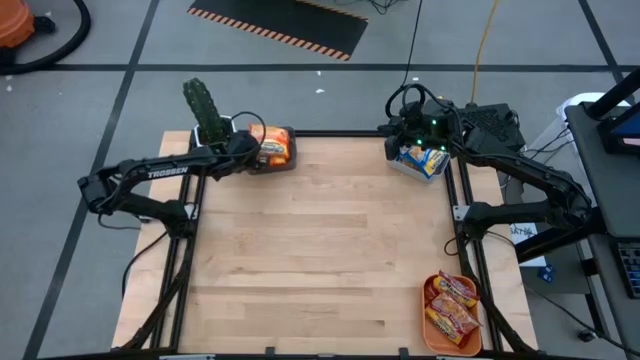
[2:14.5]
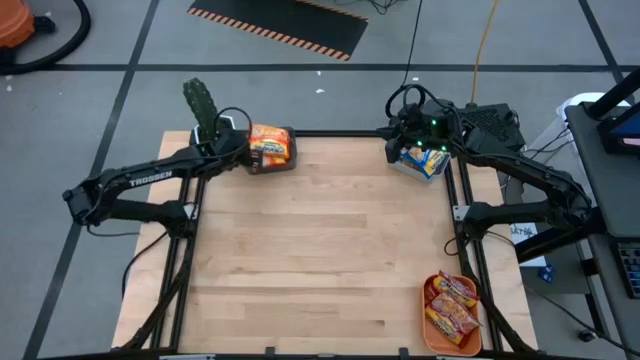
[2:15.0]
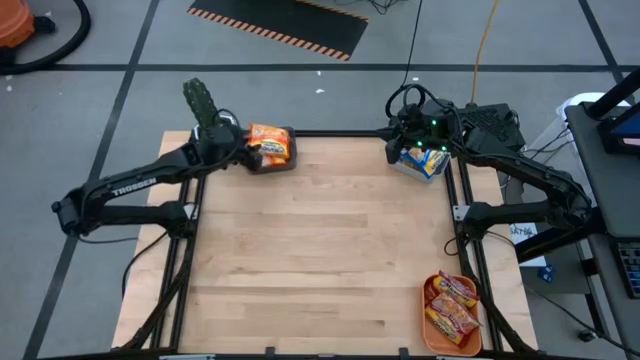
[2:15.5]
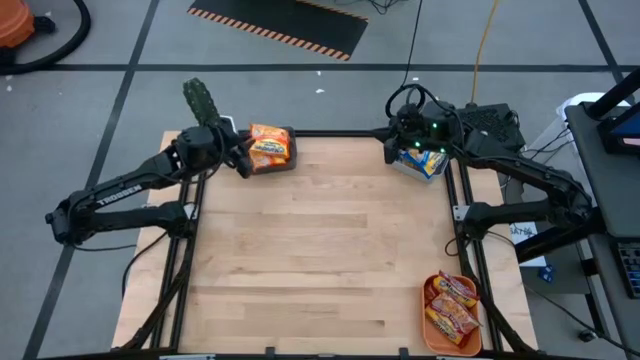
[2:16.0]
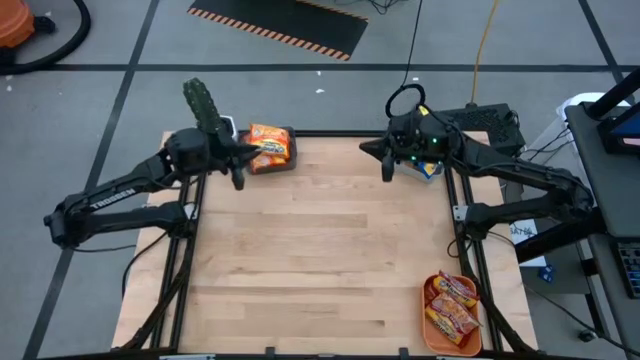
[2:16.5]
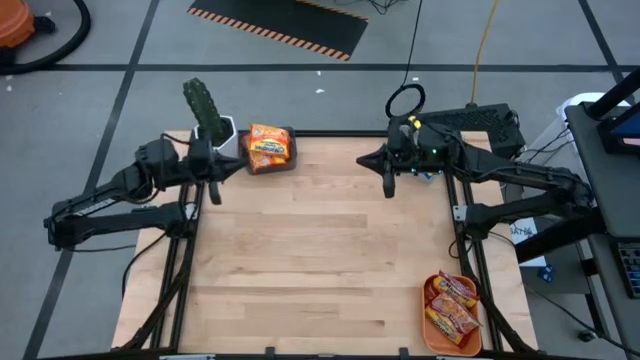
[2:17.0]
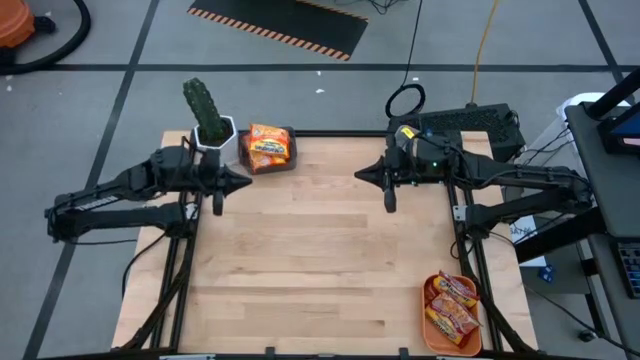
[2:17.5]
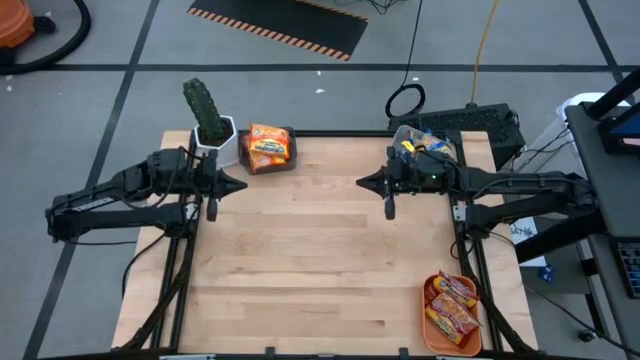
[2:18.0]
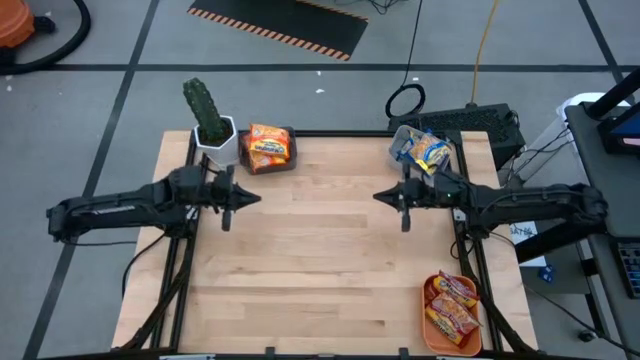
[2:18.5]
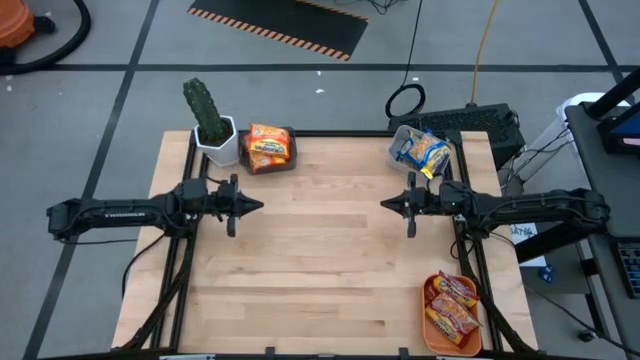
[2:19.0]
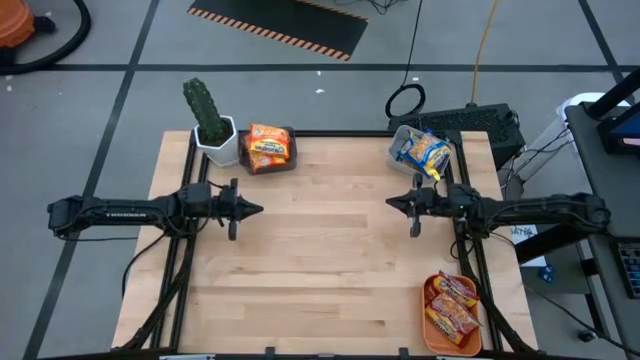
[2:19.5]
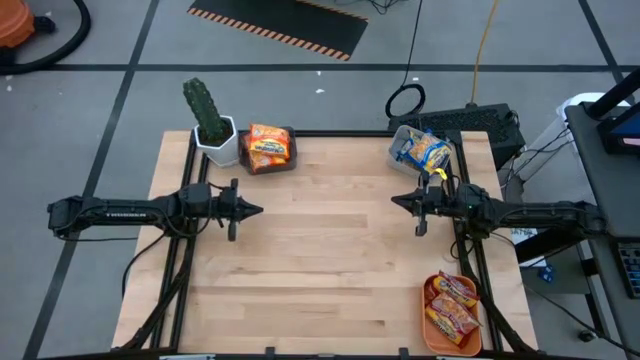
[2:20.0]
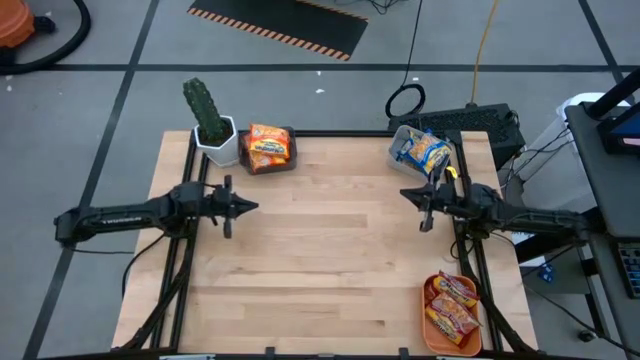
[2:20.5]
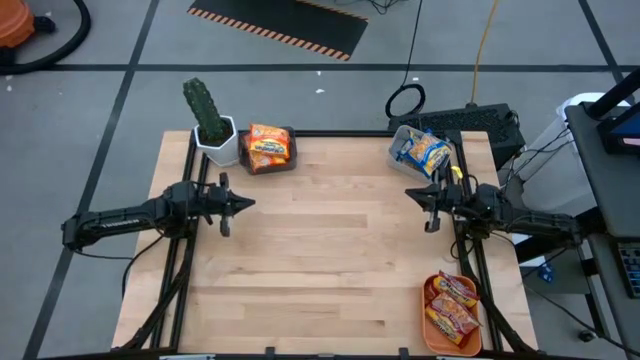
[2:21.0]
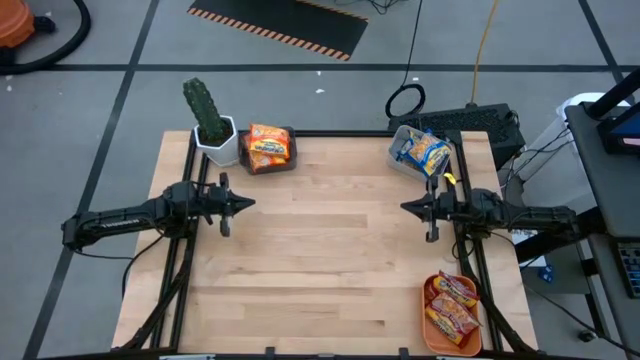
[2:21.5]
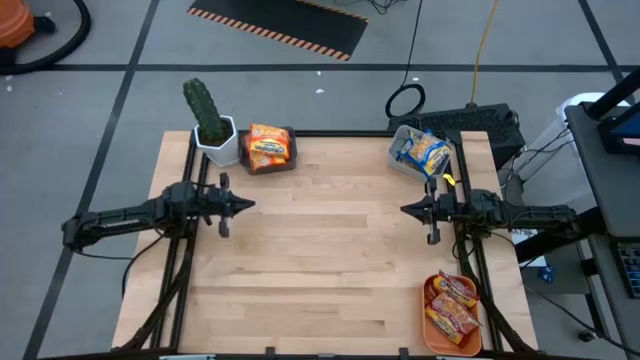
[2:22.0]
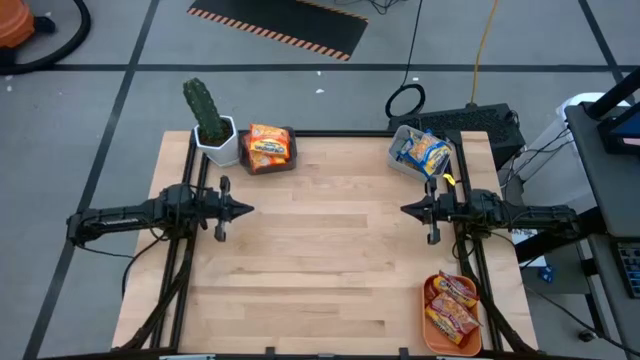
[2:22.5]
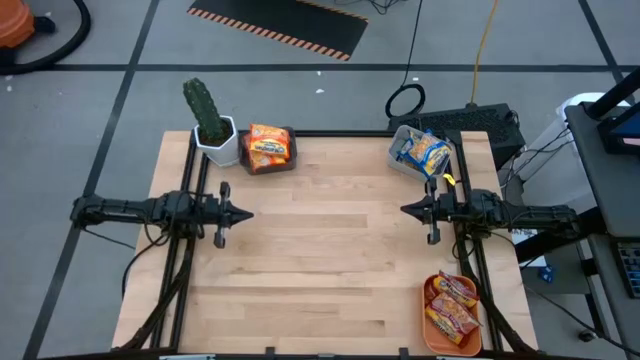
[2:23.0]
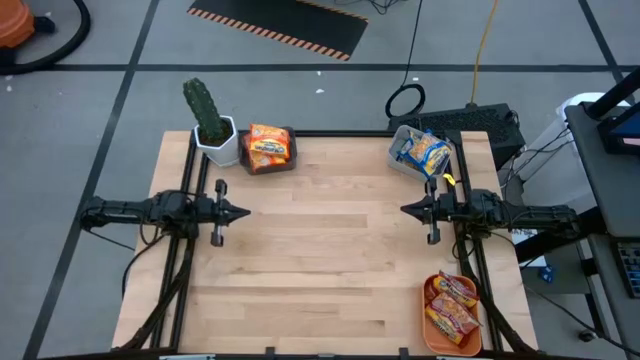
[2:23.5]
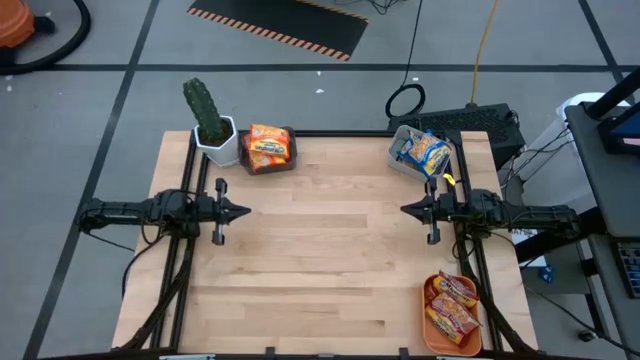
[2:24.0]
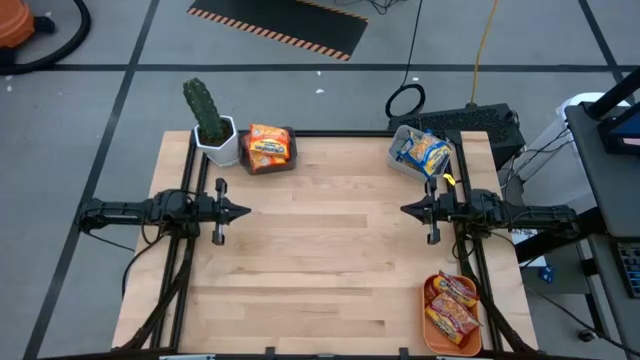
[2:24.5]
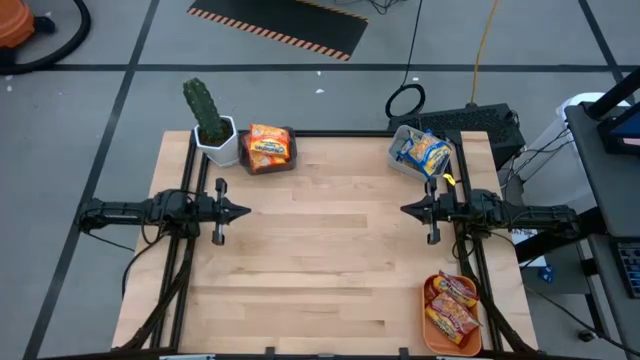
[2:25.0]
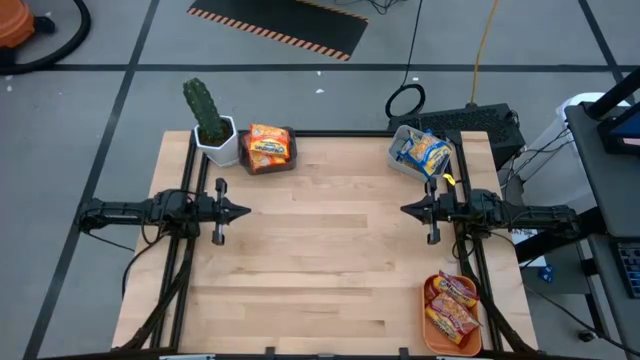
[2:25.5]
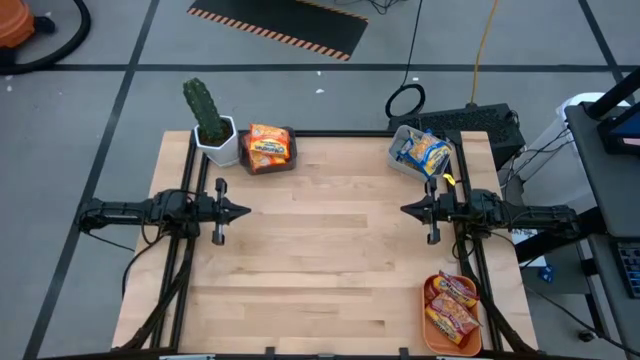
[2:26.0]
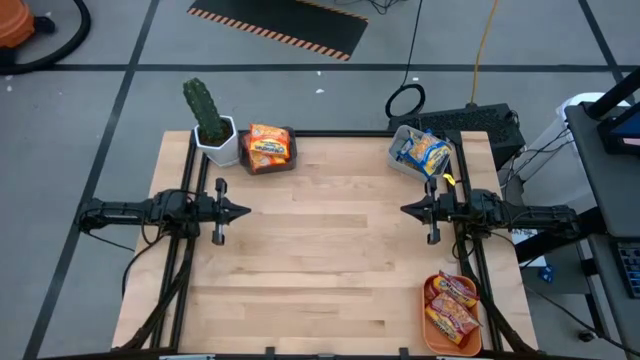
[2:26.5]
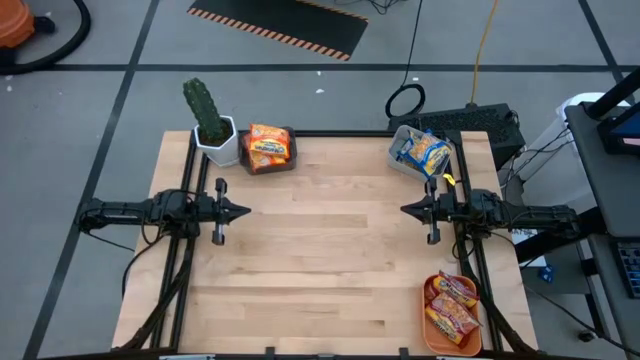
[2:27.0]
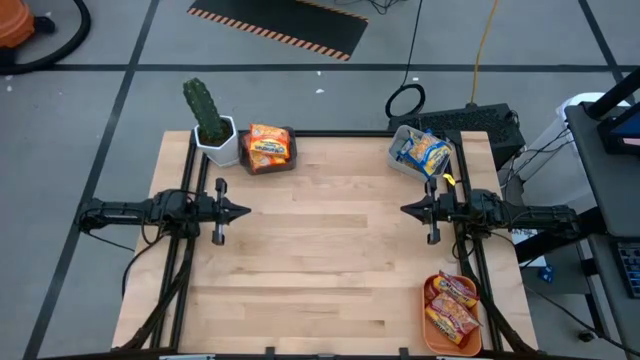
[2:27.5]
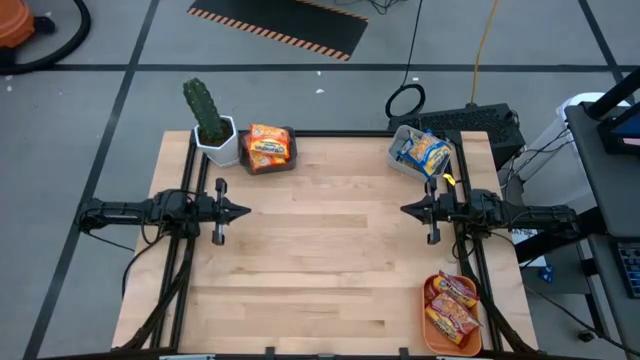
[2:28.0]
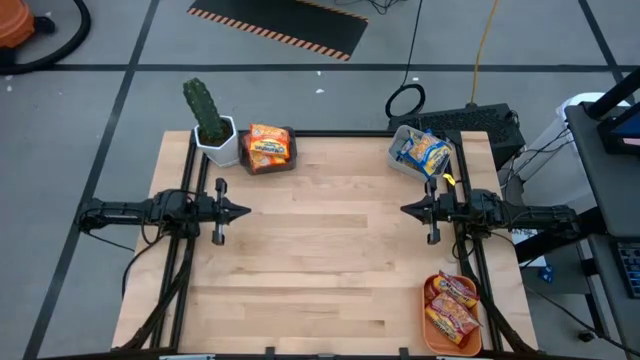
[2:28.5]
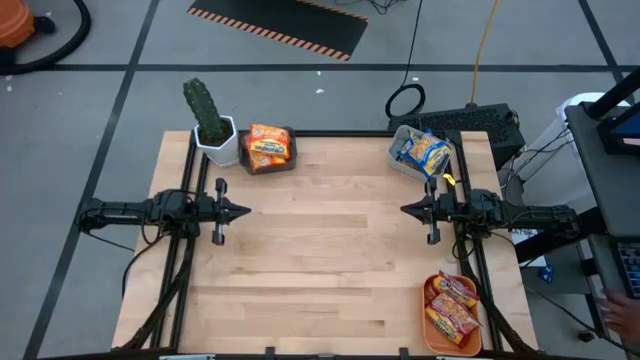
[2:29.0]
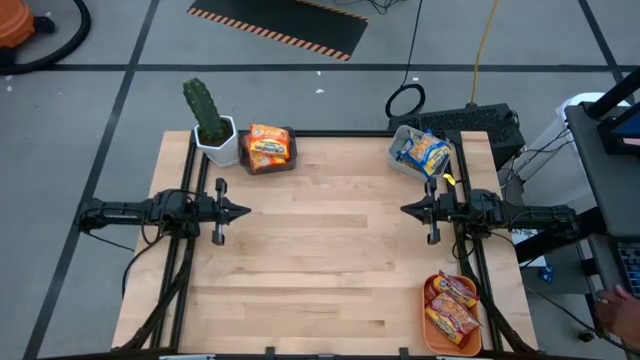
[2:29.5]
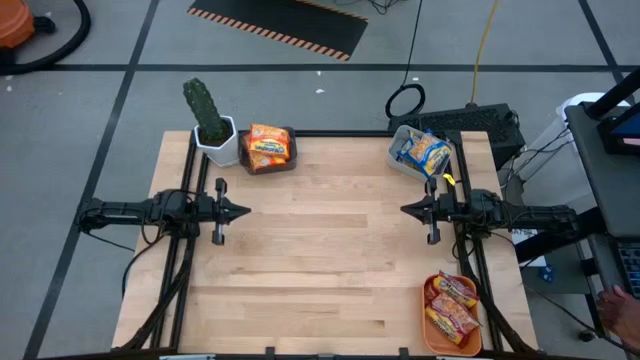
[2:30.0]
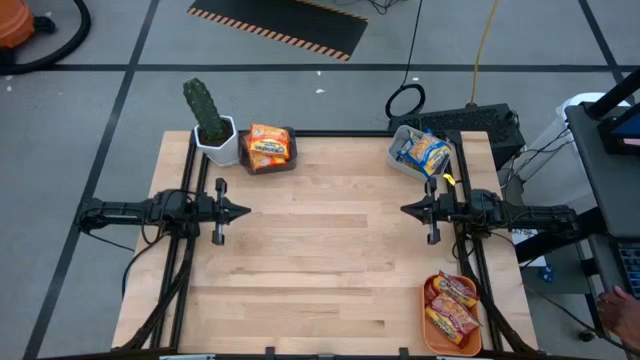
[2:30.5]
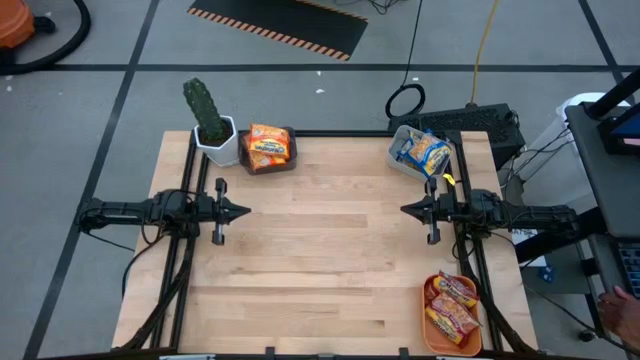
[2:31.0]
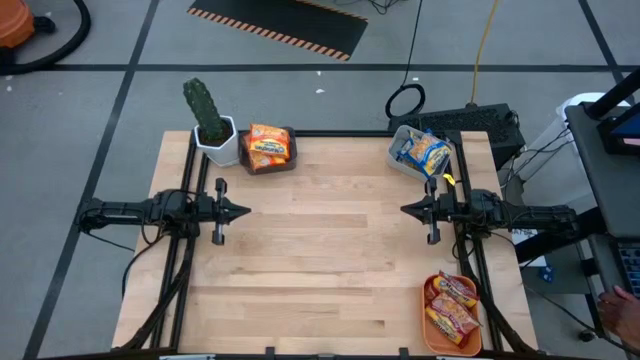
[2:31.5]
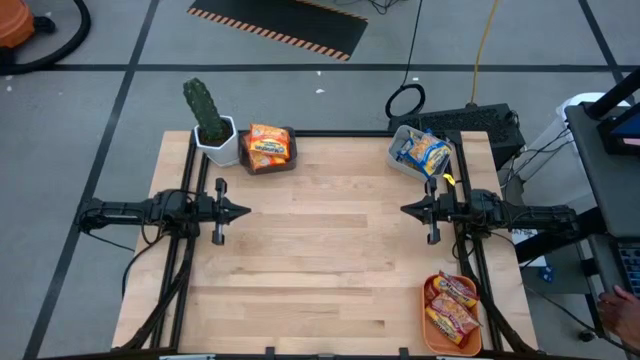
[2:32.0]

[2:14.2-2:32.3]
Task: Sort Maruchan noodles
Return to Home Position

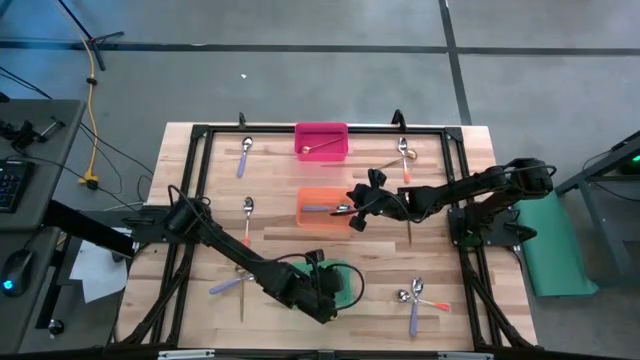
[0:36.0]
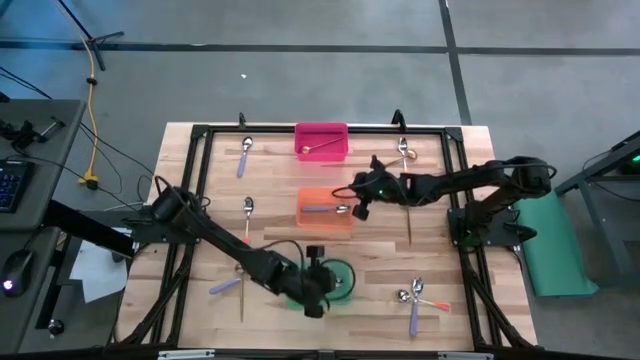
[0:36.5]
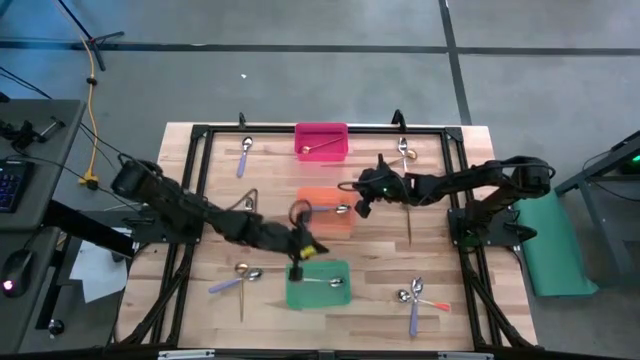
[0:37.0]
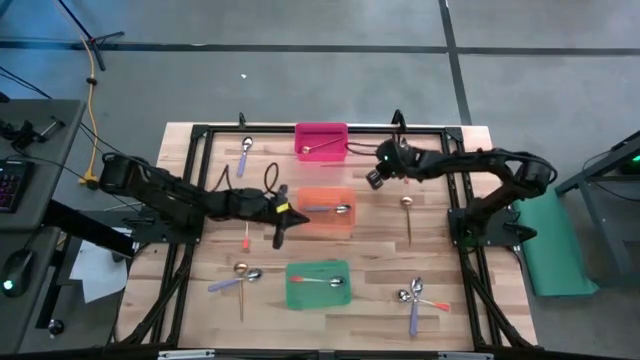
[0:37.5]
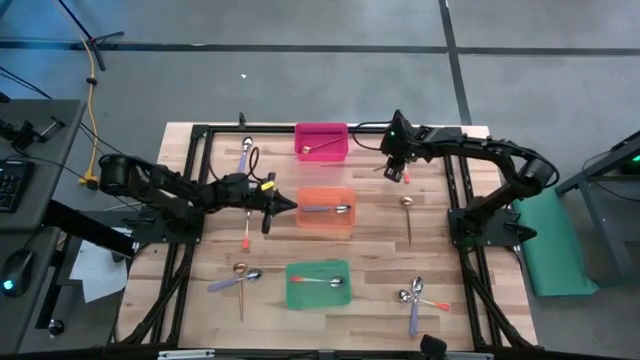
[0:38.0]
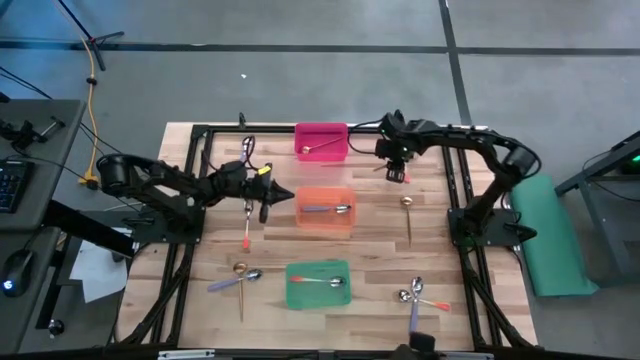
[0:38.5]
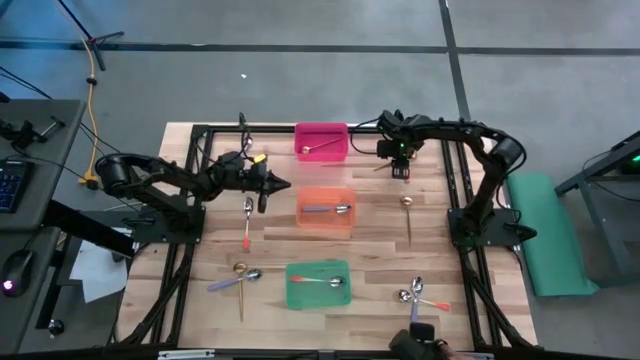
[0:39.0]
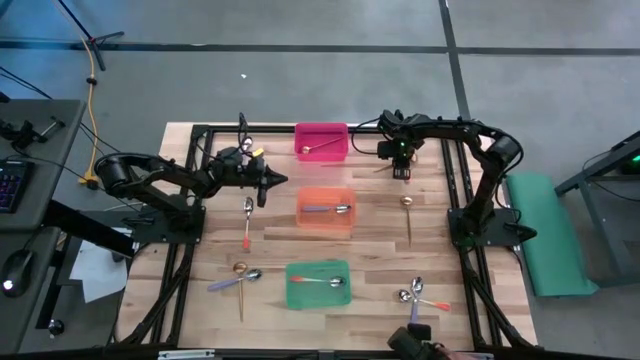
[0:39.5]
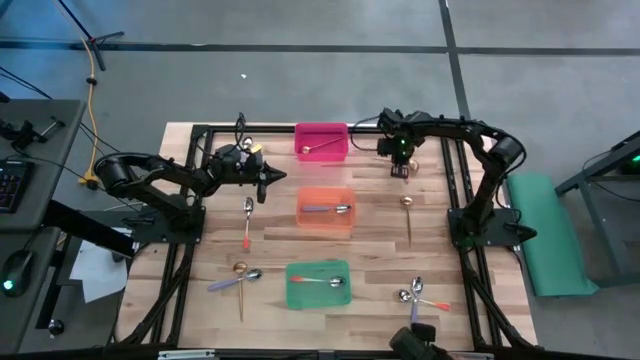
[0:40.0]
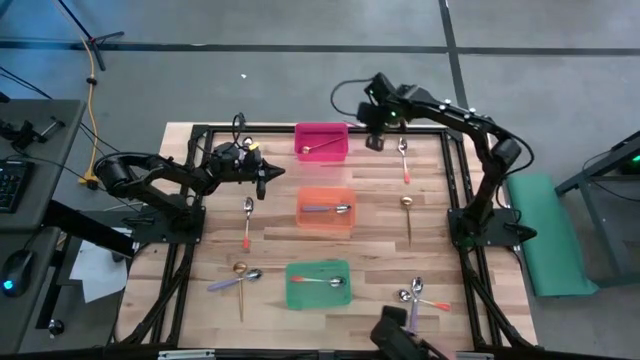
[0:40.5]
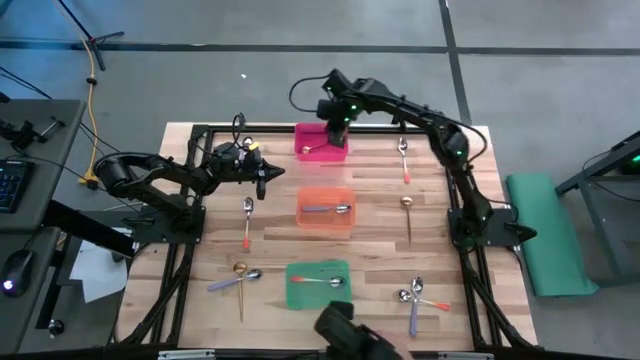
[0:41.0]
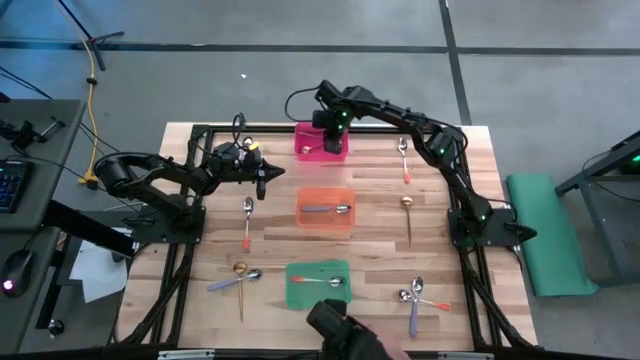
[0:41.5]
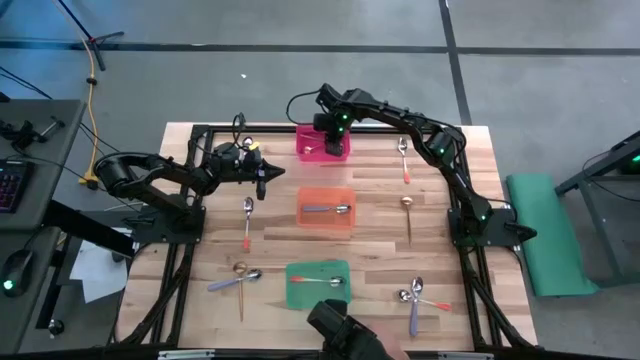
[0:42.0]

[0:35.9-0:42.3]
Task: Sort silverware by color (type)
Put the top gold spoon into the red bin
